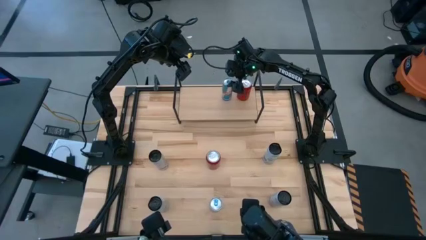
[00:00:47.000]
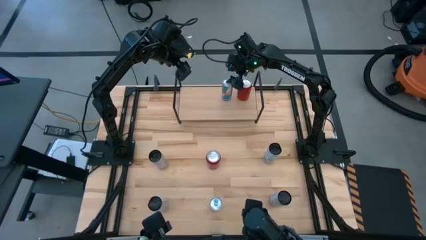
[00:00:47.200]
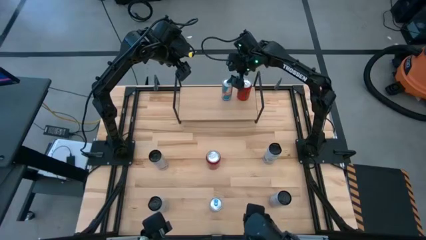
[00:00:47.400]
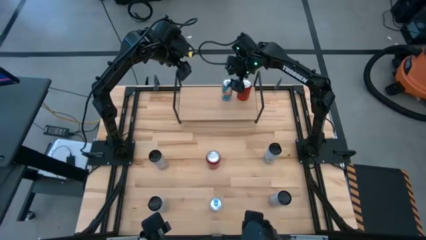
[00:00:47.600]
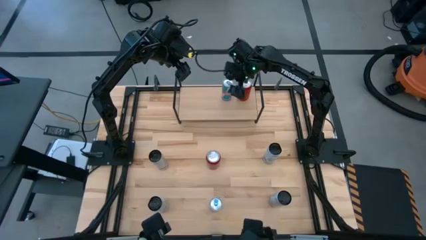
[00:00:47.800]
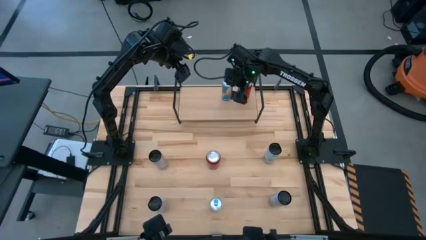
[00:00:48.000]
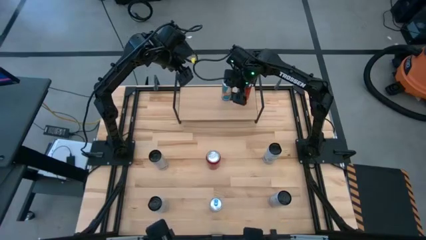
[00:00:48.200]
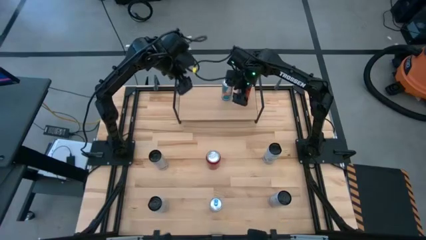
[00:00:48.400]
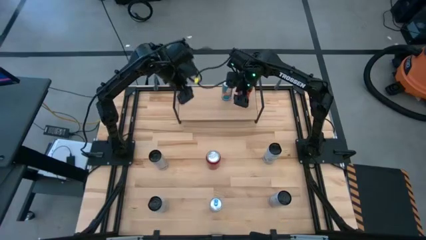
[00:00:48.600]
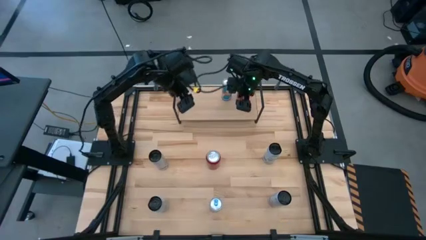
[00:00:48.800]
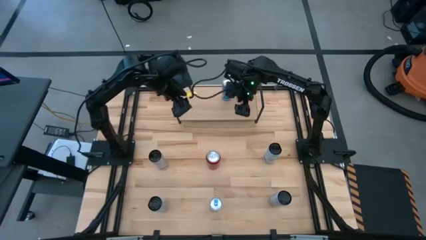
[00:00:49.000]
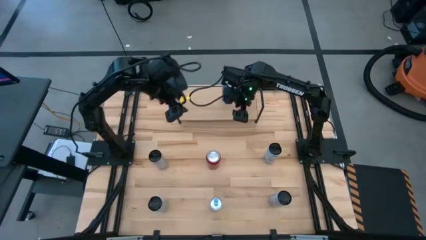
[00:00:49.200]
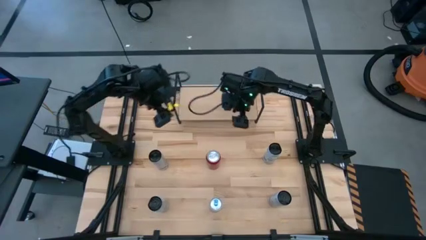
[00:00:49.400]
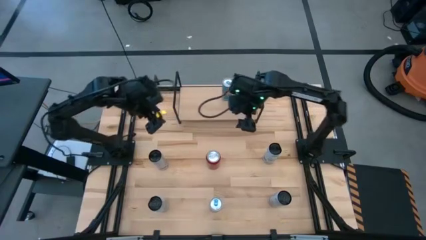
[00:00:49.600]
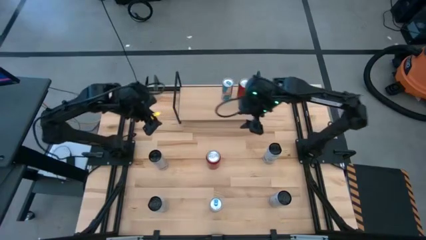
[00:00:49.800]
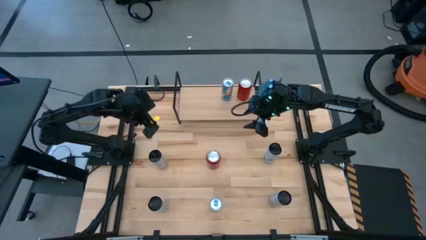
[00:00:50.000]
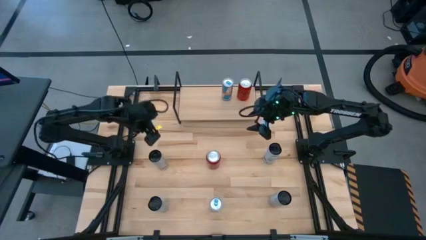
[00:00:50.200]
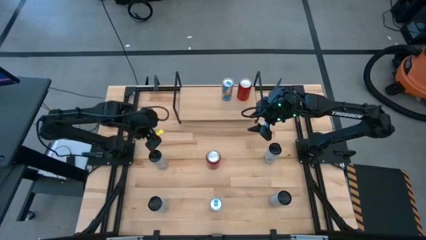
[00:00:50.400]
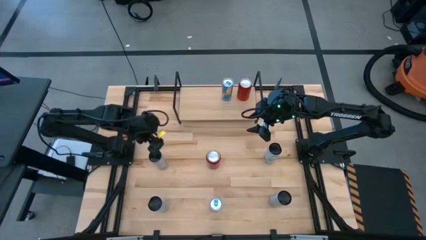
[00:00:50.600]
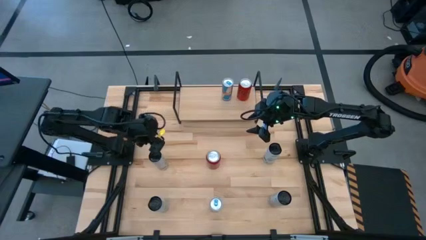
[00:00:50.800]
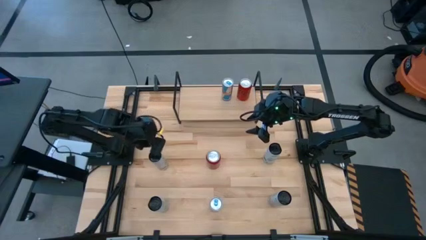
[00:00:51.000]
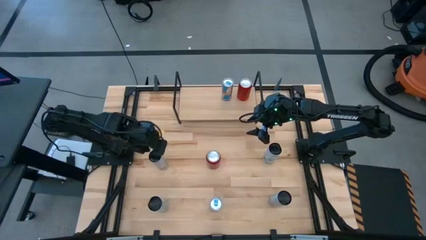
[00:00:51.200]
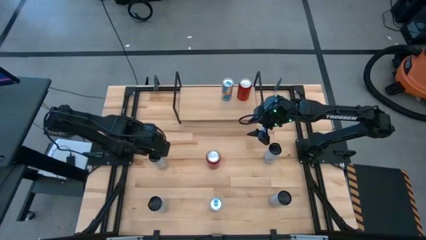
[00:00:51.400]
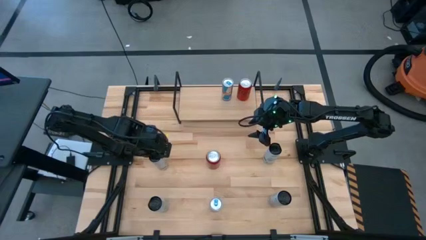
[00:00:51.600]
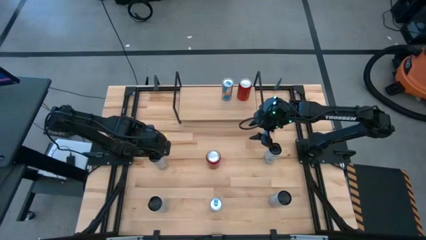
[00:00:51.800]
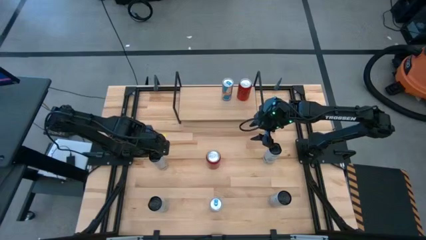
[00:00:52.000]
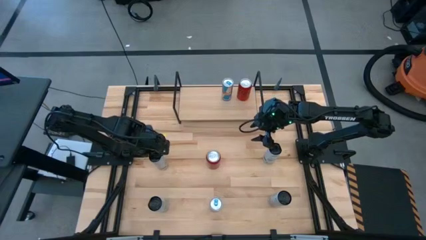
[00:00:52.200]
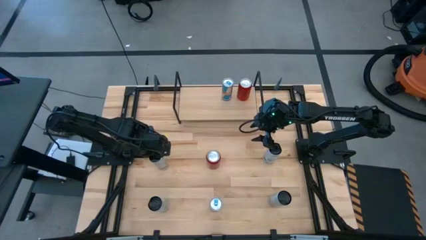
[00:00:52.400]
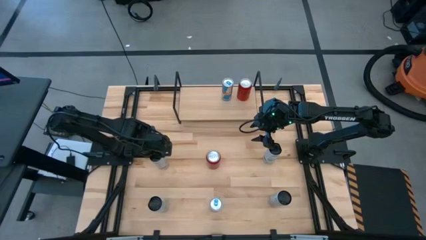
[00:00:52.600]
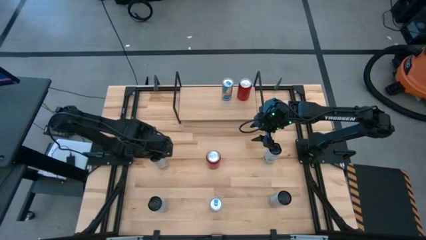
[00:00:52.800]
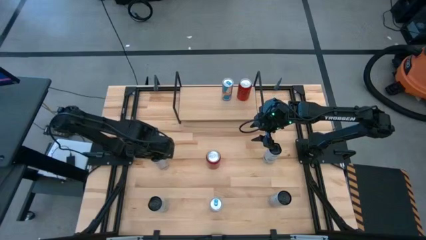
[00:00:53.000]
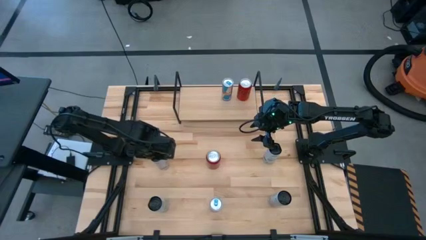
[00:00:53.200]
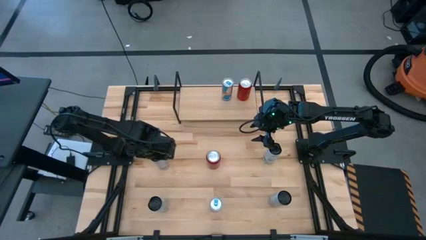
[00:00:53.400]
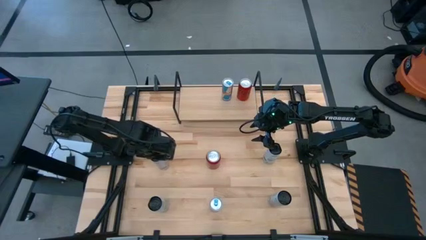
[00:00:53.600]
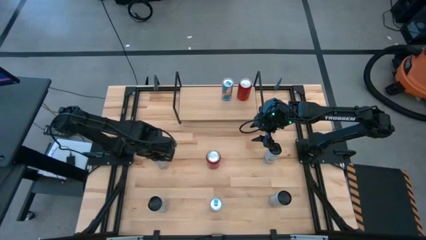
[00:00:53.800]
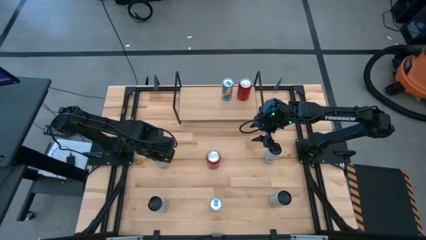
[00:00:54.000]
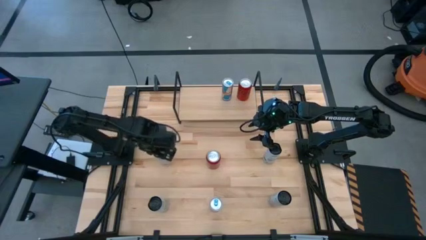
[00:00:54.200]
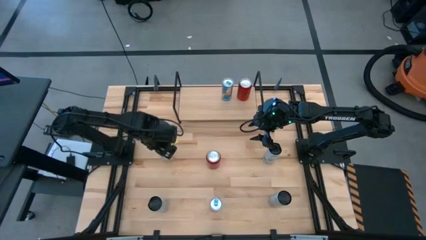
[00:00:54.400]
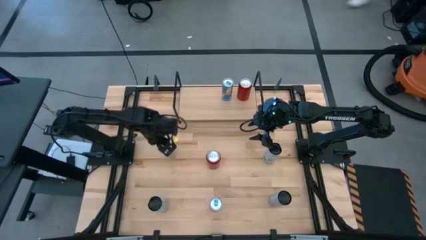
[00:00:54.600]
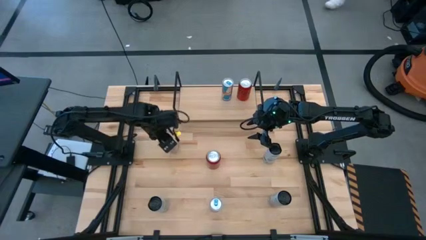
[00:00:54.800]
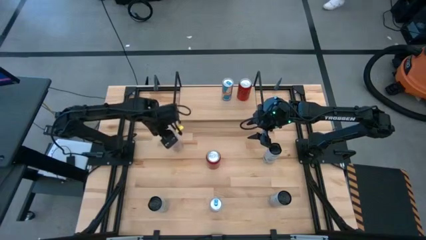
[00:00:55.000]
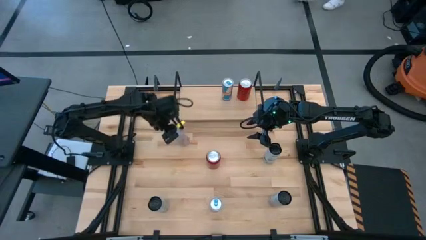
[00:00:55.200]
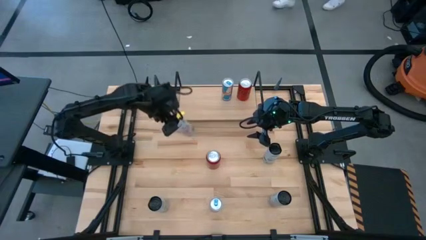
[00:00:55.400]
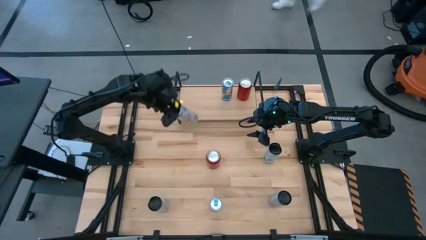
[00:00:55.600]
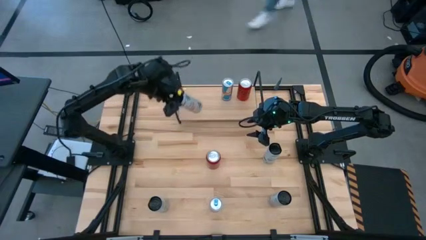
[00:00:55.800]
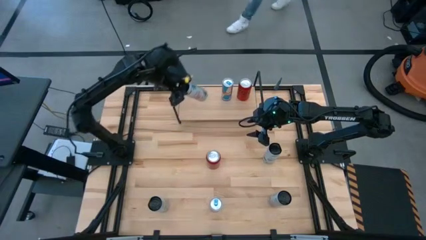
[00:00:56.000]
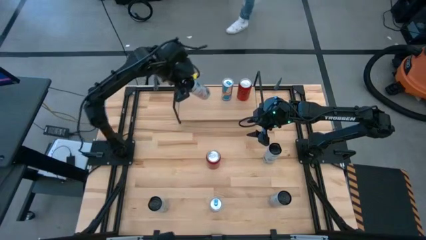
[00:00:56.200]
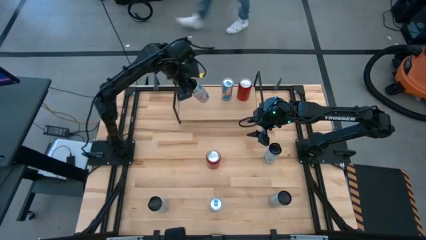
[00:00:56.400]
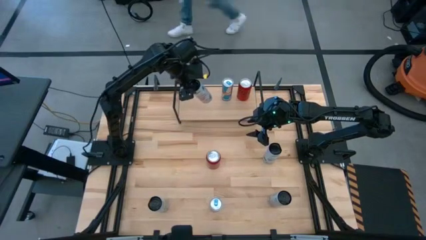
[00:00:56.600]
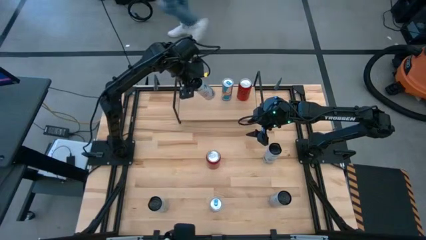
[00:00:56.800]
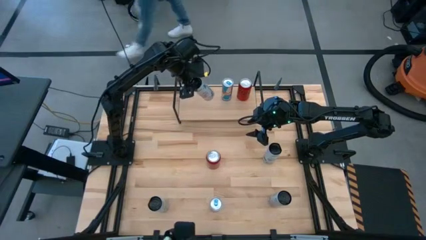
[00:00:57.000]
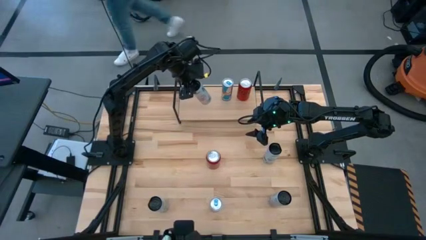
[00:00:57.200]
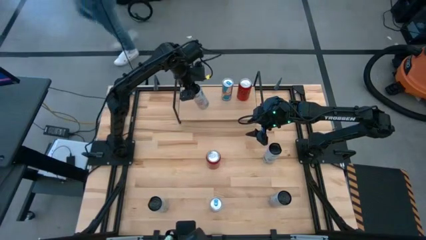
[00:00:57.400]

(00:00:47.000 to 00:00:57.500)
Task: Place canned beverage on shelf
Put the top white and pink soda can on the shelf

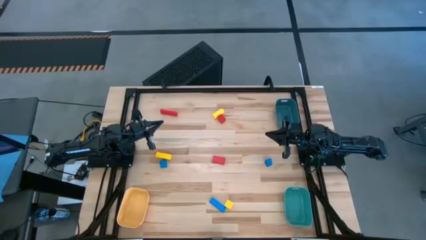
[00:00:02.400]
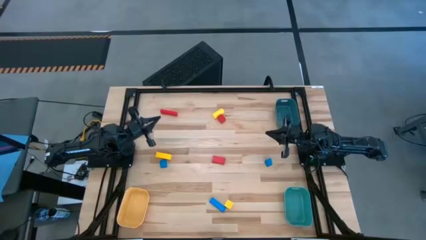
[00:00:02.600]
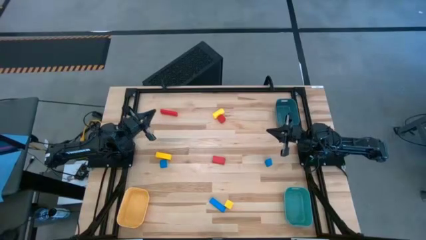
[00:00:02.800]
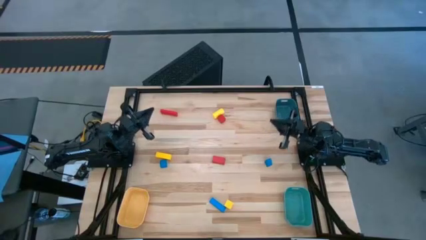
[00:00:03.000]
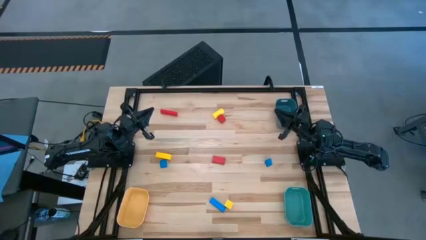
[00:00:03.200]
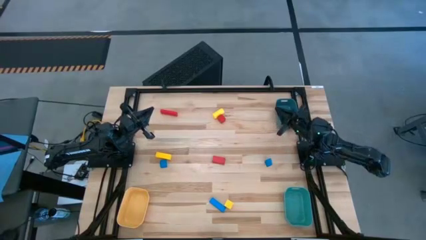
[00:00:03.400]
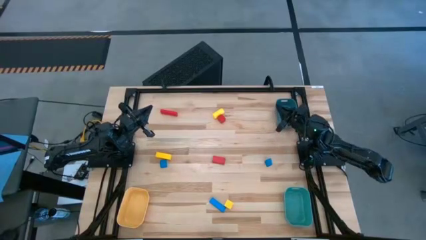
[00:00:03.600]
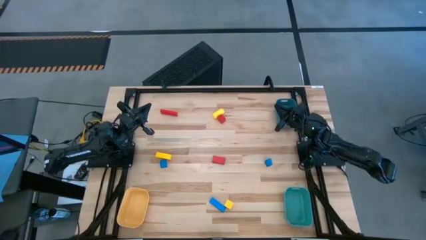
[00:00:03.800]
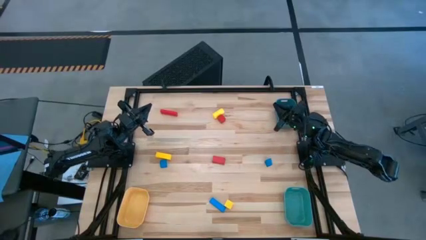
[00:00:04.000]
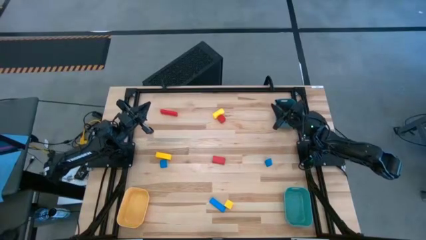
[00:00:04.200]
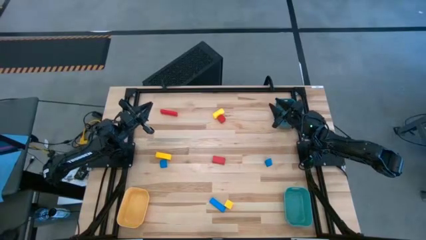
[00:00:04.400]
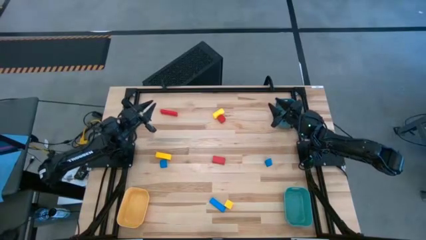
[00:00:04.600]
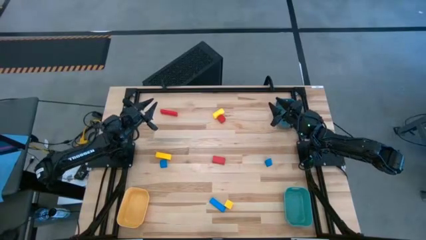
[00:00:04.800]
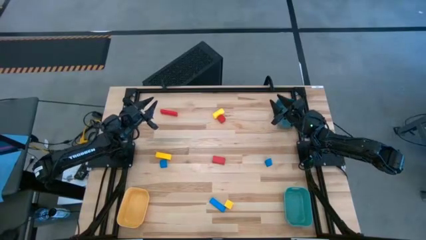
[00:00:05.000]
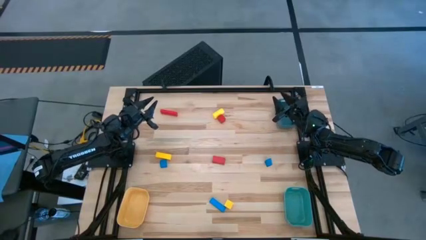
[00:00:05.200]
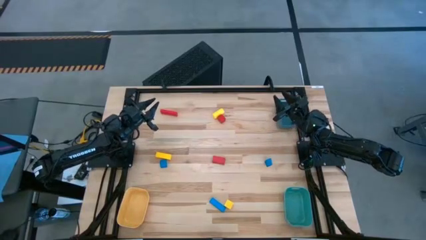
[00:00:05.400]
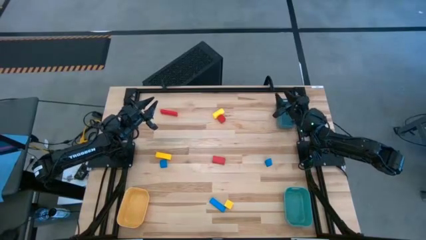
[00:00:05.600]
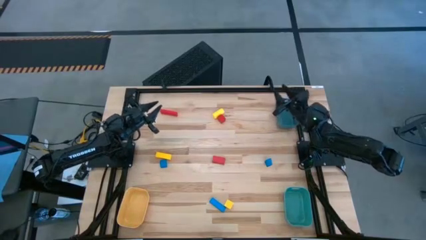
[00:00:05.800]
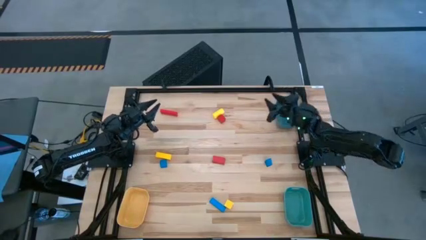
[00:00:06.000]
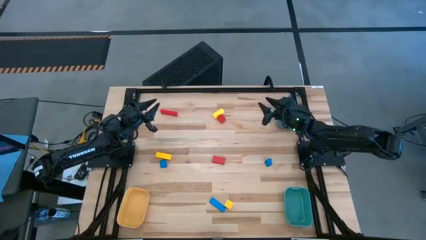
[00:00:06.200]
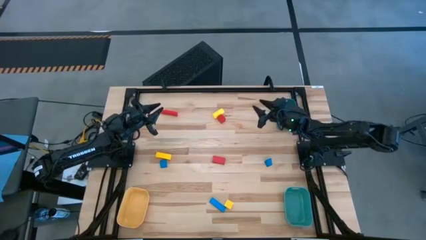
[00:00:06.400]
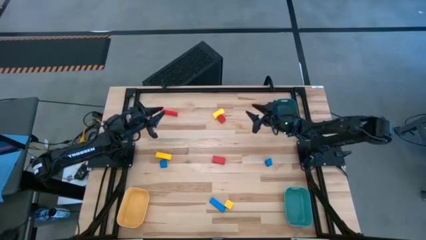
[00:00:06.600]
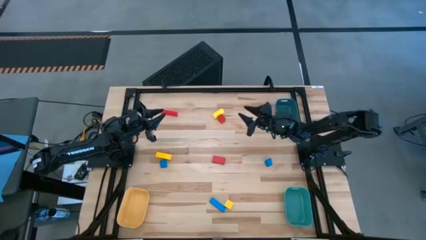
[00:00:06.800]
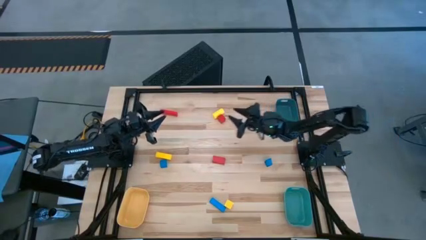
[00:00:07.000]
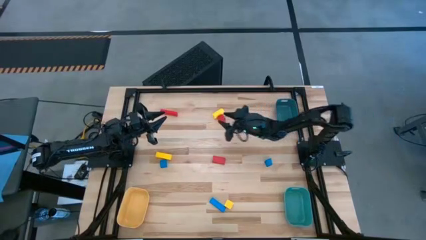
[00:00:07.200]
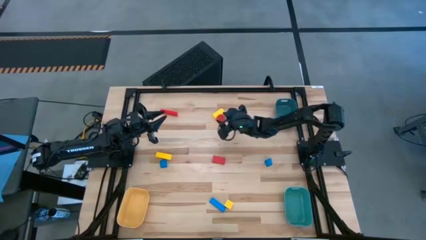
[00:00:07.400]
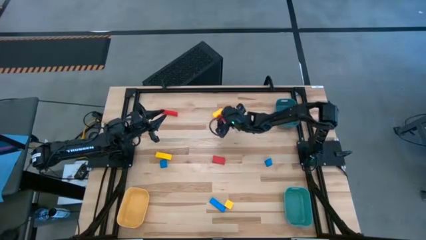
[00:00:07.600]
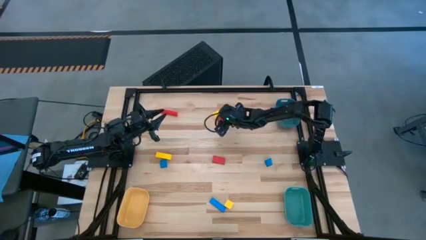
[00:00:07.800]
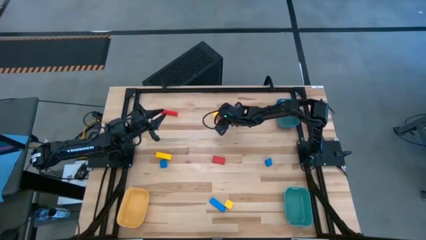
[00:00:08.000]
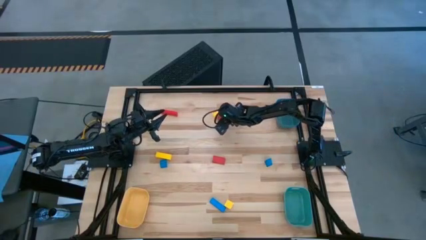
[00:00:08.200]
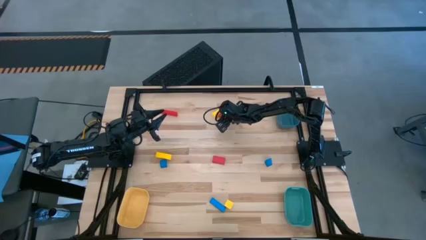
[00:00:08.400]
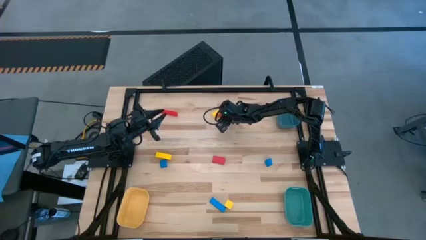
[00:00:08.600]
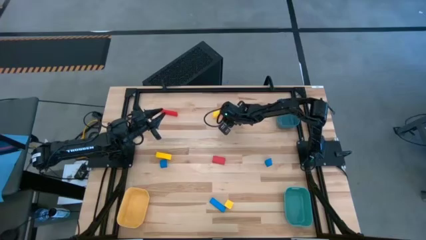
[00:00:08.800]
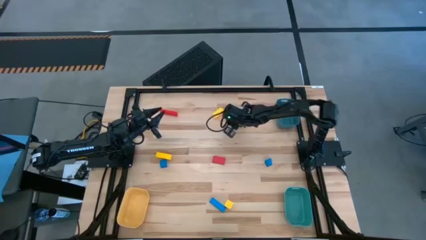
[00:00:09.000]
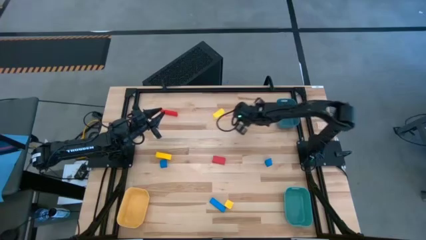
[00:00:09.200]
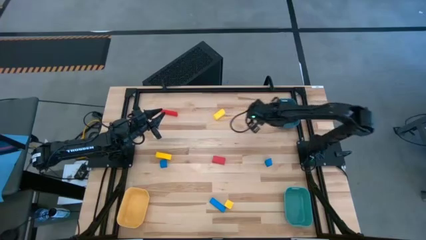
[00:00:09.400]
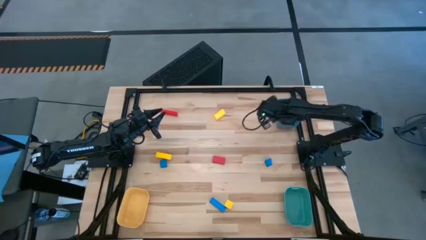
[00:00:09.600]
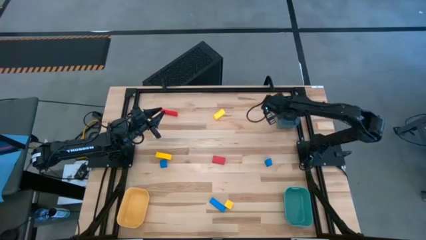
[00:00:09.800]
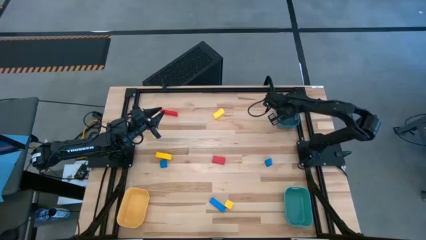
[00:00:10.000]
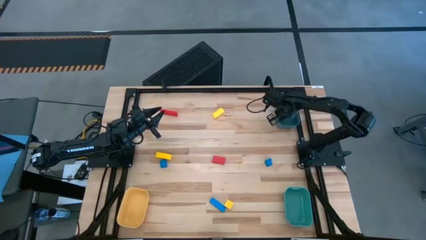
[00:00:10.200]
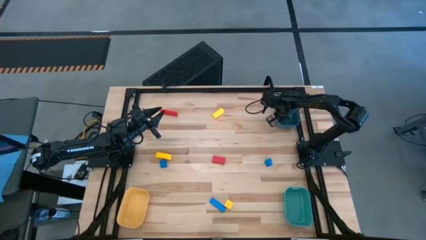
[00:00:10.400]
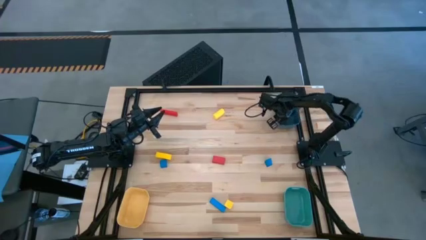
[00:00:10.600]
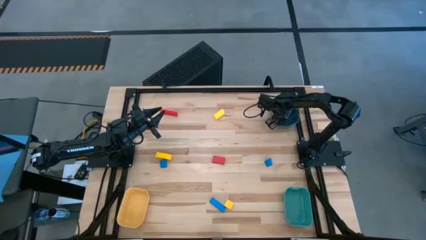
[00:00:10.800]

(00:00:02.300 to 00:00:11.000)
Task: Sort & place blocks by color
Put the top right red block into the blue bin
